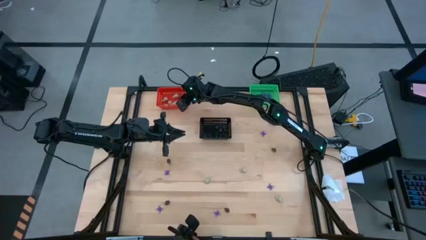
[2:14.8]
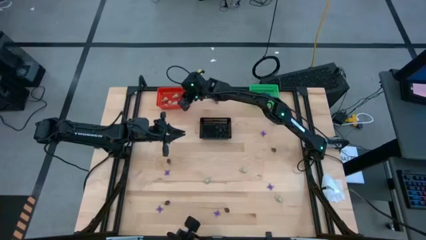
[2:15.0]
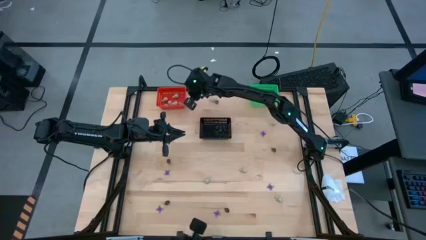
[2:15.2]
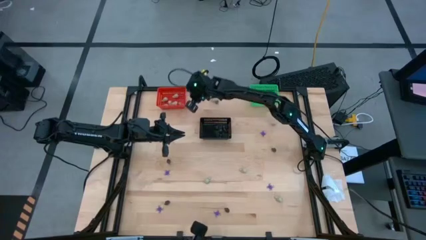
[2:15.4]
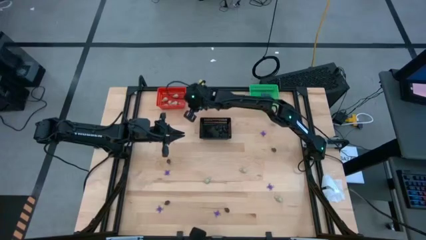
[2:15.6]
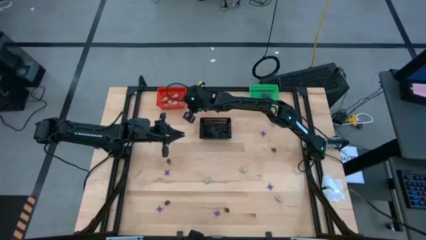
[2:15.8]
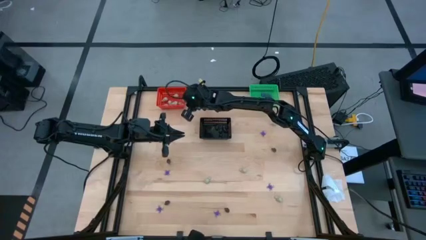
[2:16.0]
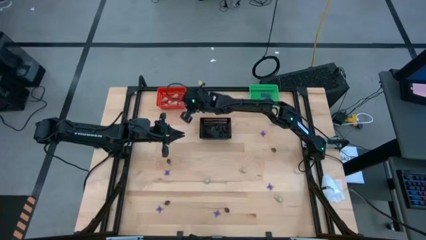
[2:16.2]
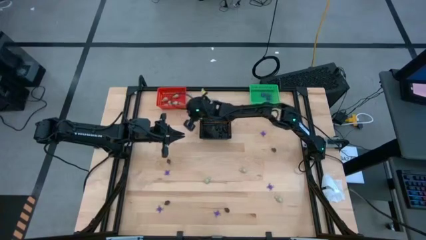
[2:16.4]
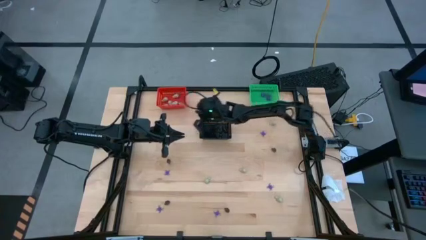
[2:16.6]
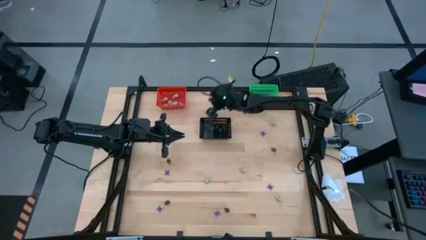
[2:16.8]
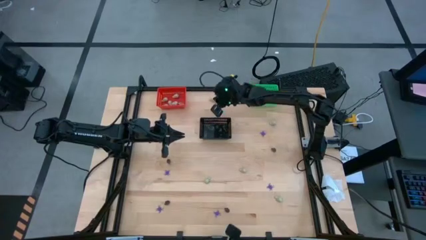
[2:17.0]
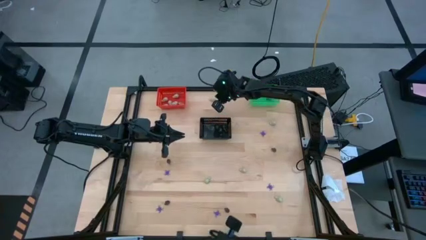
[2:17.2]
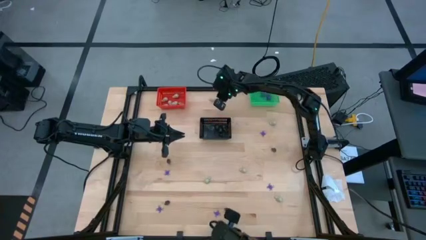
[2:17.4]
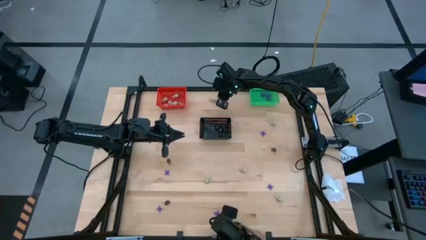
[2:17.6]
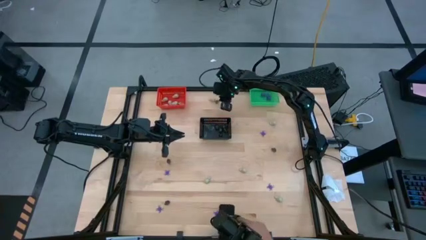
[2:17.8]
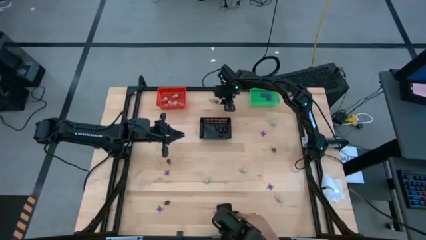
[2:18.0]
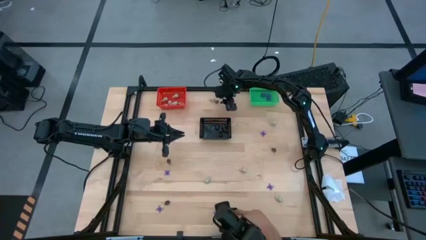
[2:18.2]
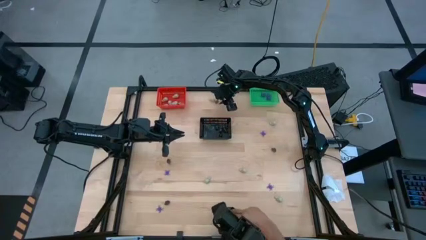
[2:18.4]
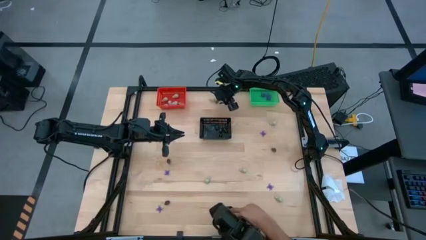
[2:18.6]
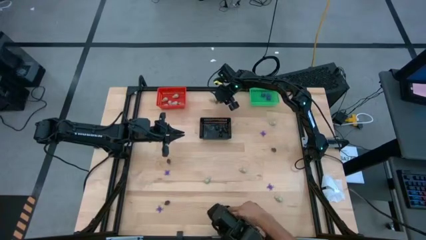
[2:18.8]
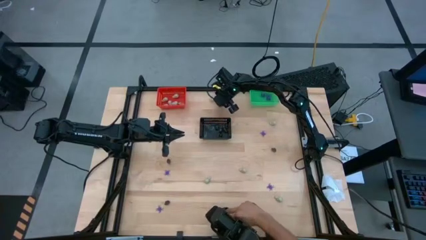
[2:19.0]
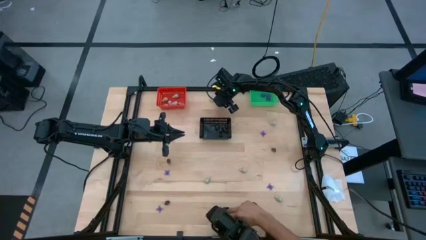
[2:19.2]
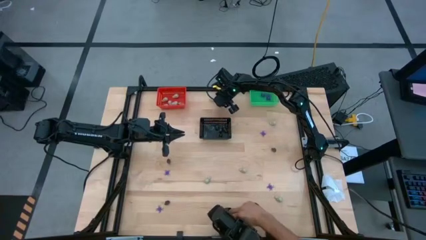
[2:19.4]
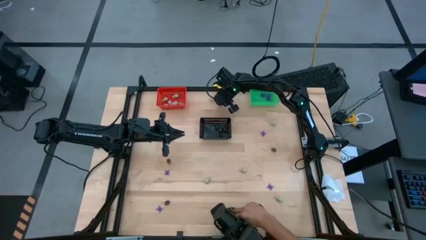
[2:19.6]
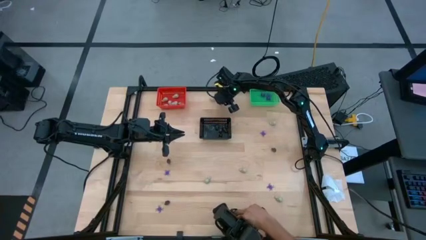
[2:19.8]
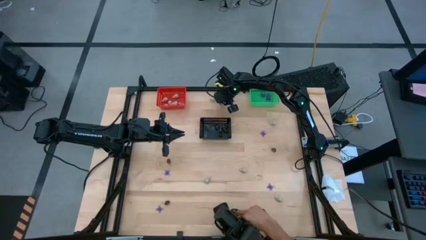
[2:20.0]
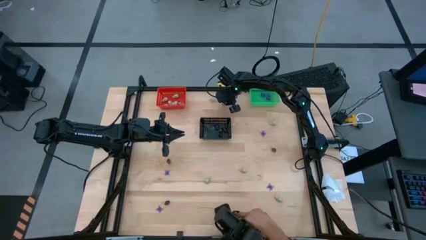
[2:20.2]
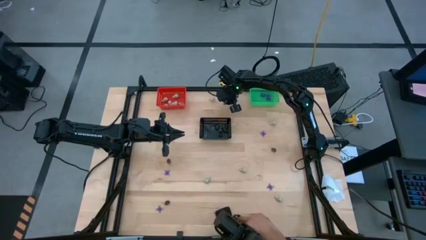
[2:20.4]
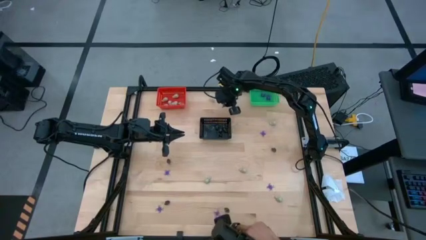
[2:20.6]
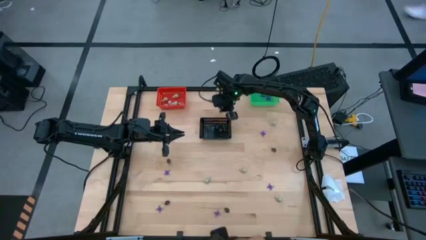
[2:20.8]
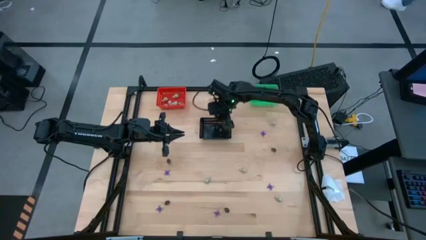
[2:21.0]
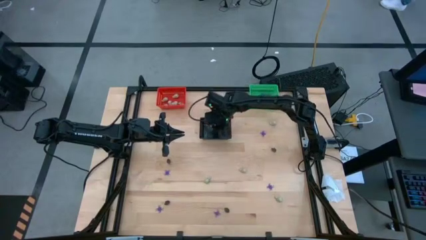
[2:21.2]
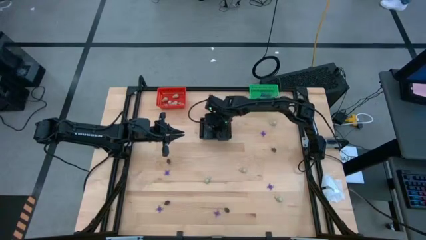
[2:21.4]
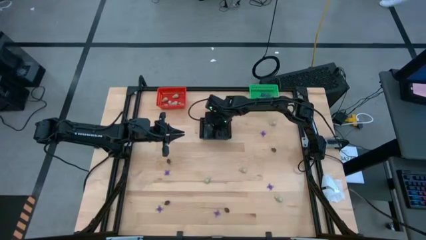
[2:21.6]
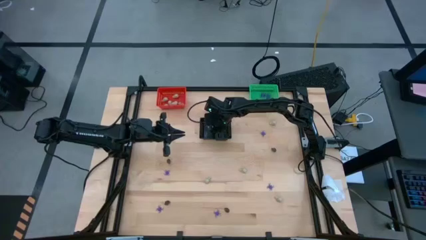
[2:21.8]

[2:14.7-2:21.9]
Task: Sort Halloween decoration
Put the black skull toy into the black bin

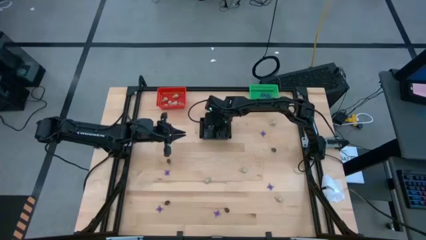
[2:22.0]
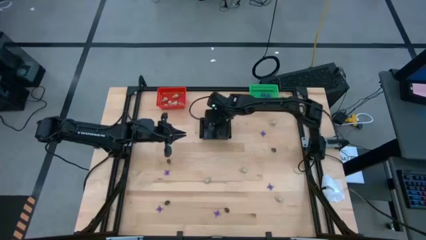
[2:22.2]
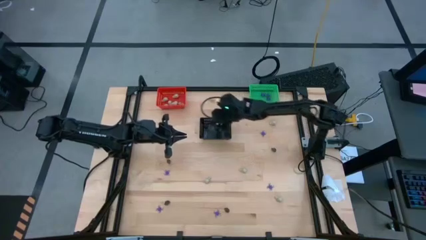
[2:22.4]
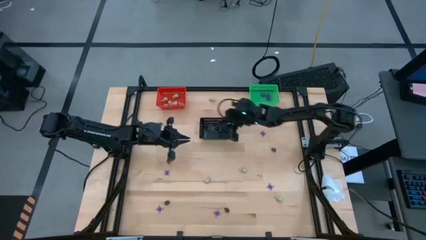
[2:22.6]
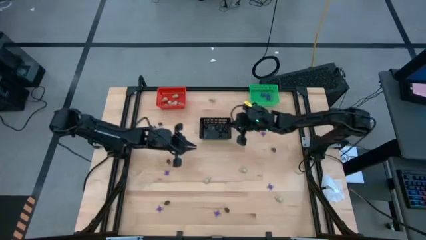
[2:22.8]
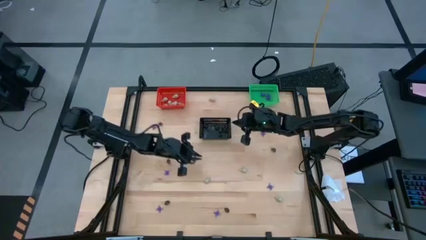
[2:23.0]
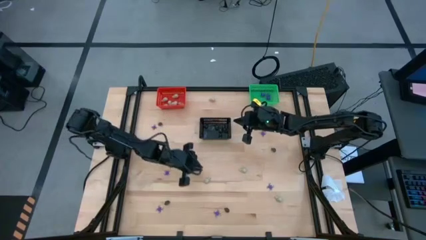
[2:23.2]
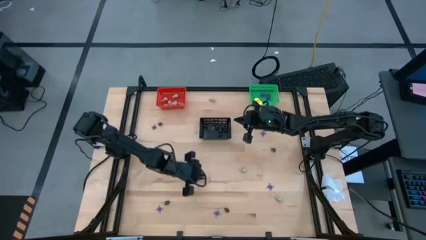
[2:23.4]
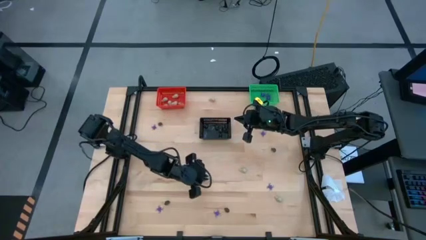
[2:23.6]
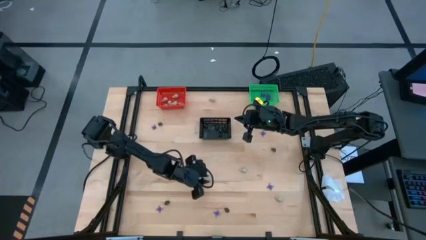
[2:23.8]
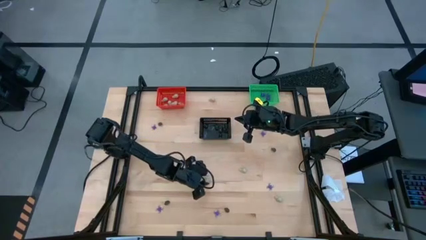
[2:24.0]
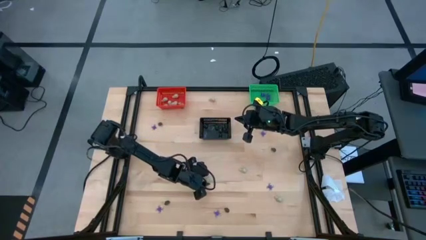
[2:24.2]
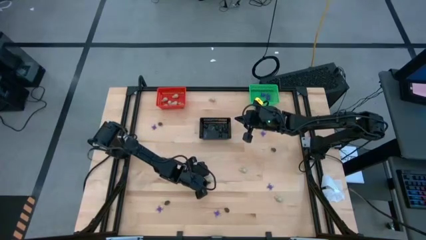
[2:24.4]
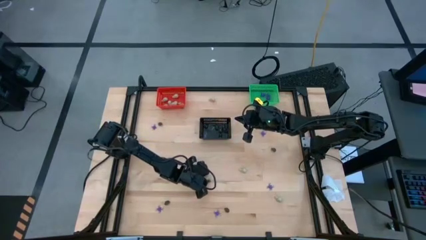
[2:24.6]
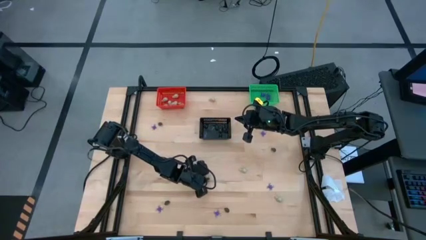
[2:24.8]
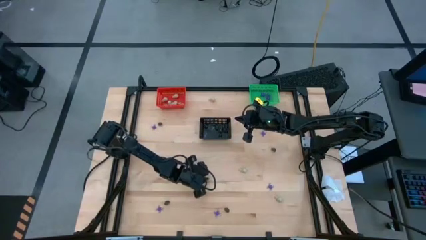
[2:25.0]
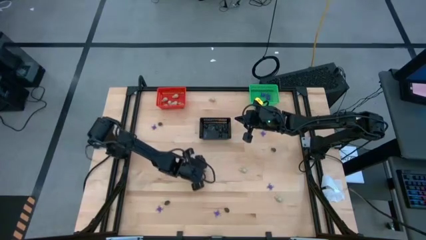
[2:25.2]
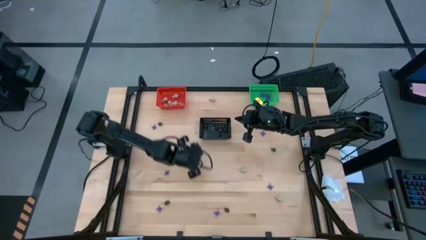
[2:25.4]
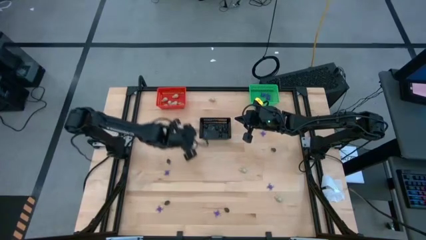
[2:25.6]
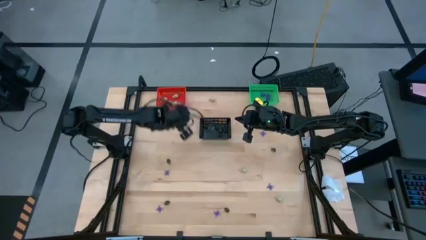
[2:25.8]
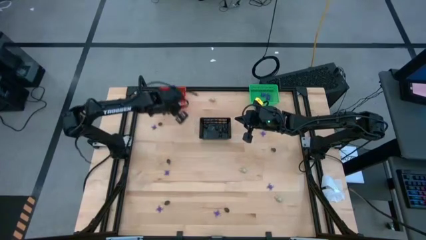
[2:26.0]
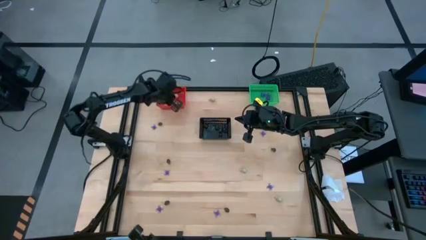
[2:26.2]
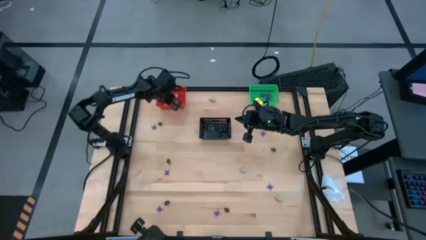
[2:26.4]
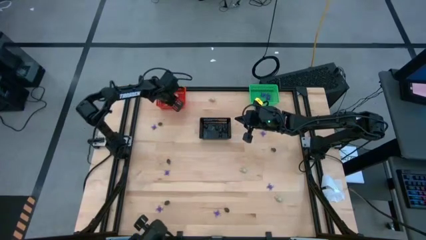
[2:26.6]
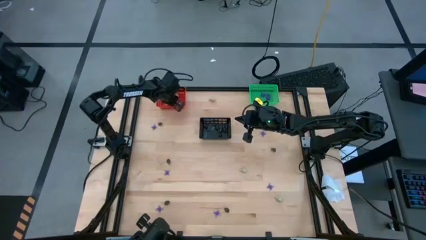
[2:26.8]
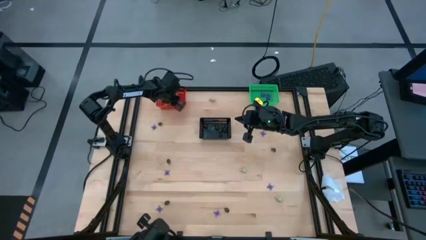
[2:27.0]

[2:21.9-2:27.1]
Put the white skull toy into the orange bin

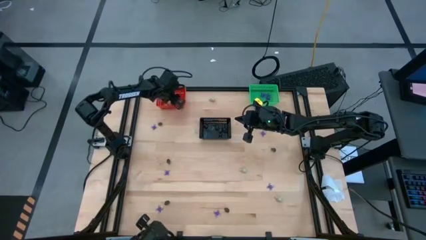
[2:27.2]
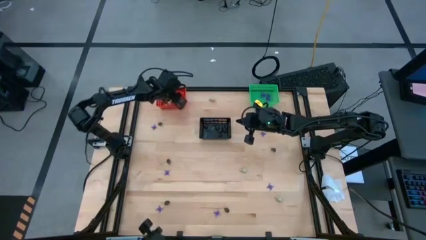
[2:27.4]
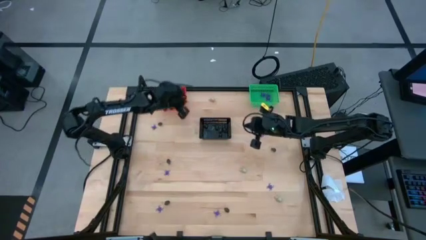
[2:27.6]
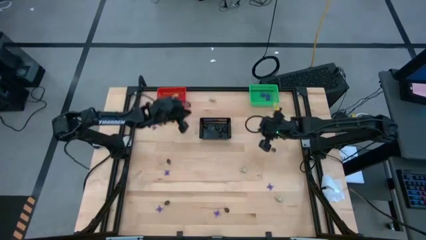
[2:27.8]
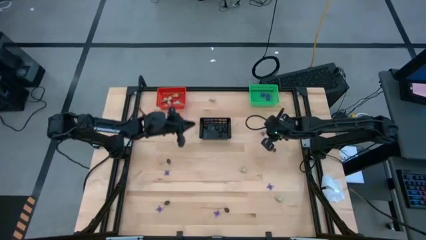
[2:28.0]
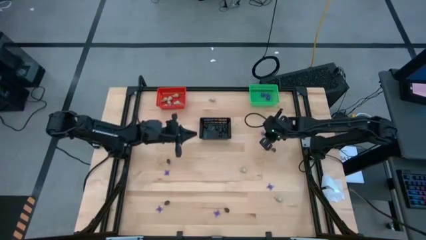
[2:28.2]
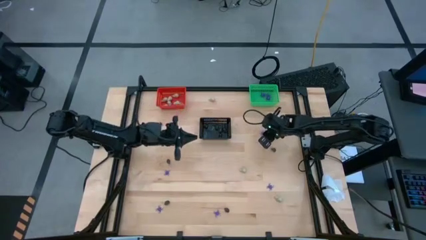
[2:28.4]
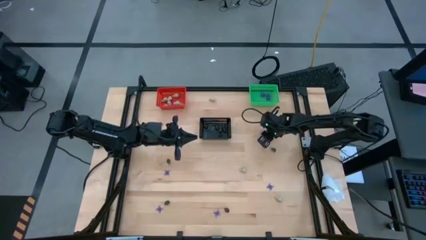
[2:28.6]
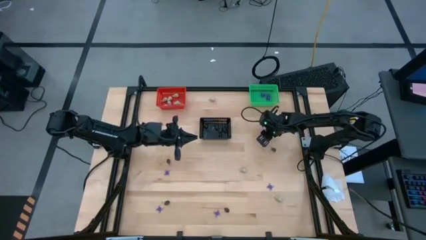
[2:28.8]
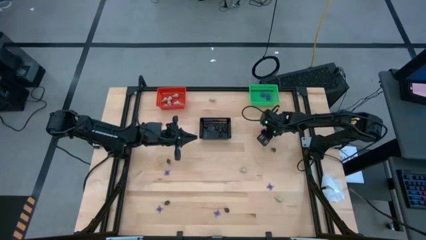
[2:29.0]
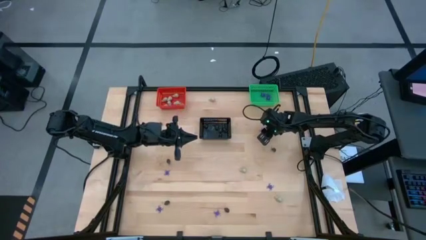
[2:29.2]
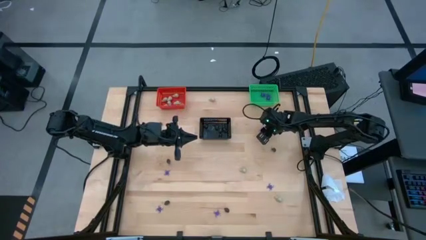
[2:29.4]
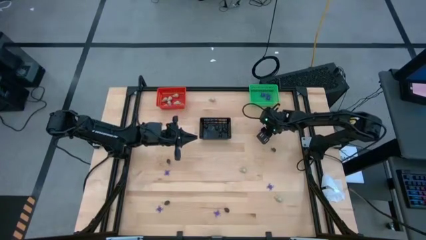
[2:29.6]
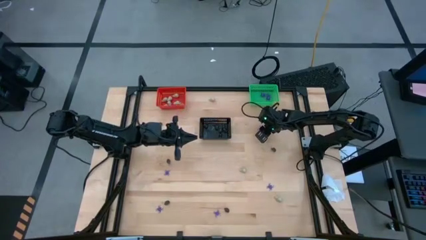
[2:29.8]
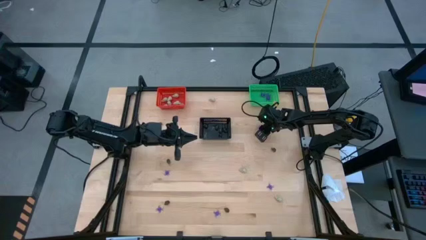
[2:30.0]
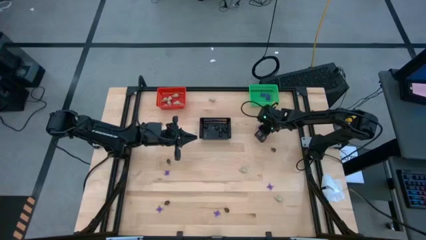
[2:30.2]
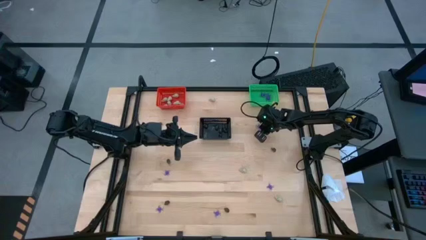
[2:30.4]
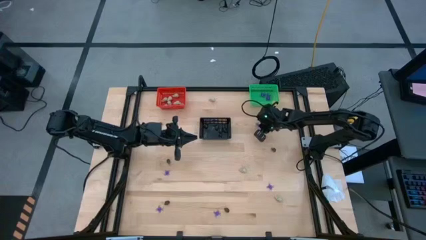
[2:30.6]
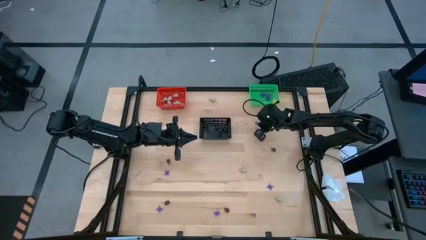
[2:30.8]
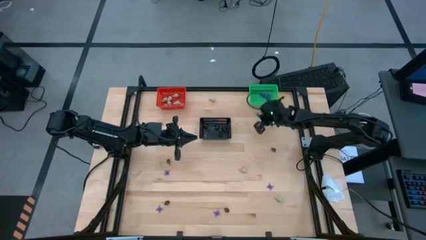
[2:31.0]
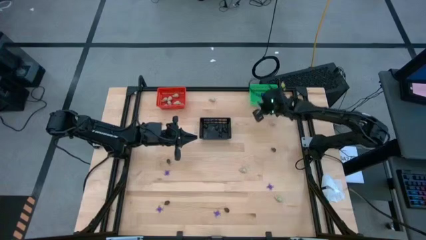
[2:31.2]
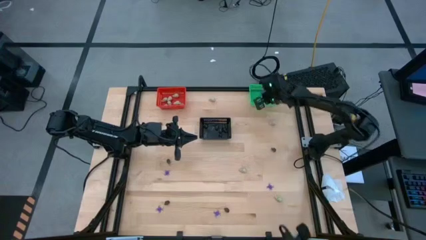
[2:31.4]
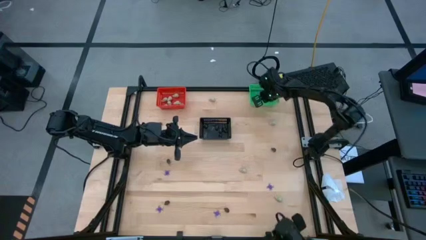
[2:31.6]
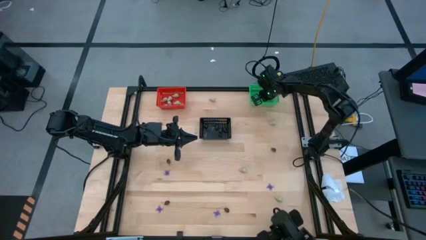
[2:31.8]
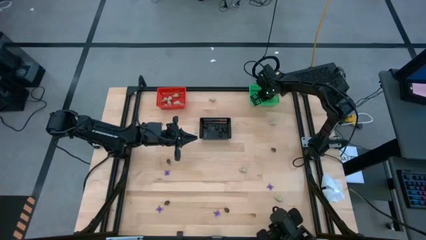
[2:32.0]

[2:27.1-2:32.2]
Put the violet spider toy into the green bin
